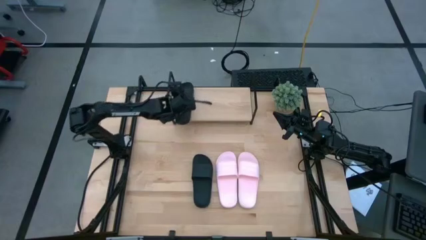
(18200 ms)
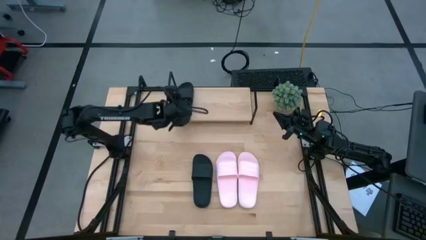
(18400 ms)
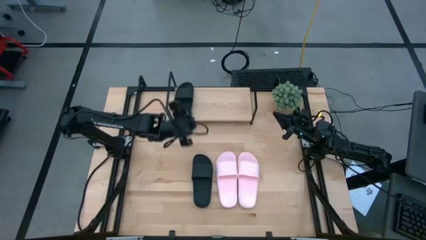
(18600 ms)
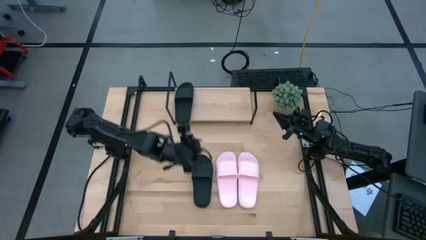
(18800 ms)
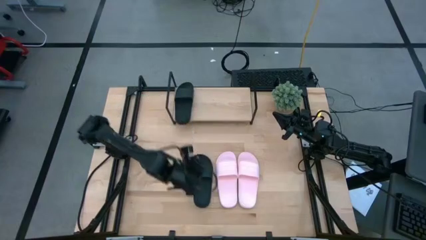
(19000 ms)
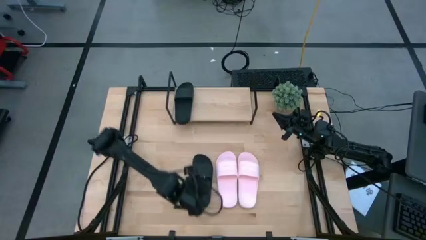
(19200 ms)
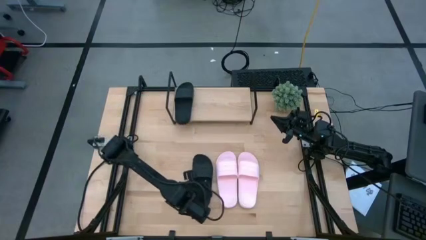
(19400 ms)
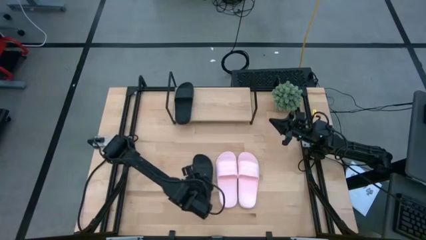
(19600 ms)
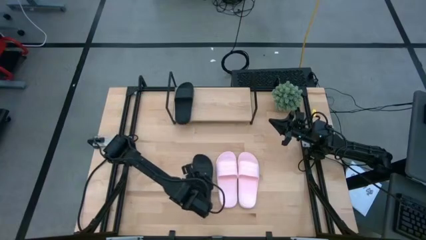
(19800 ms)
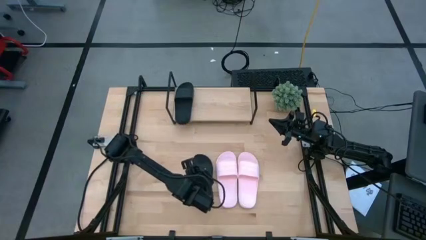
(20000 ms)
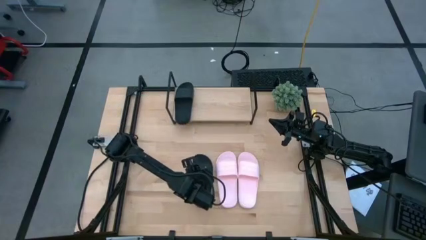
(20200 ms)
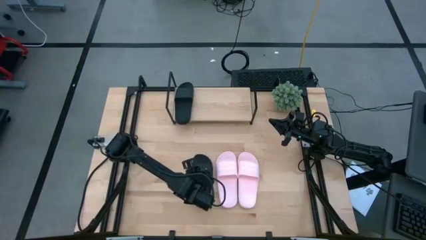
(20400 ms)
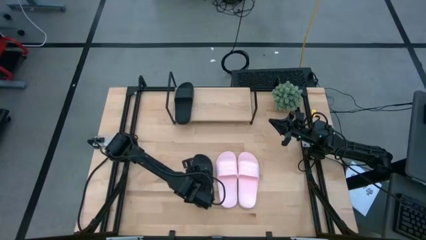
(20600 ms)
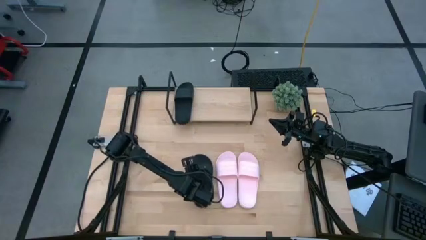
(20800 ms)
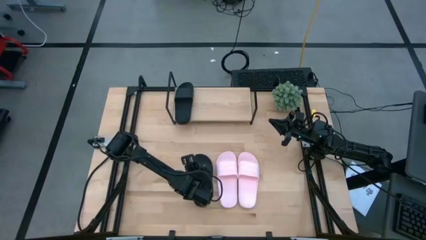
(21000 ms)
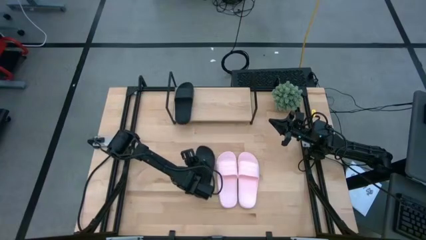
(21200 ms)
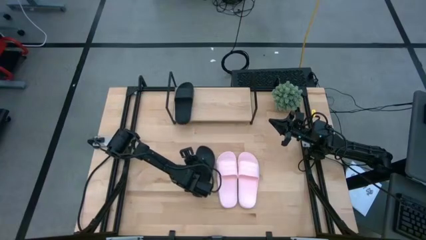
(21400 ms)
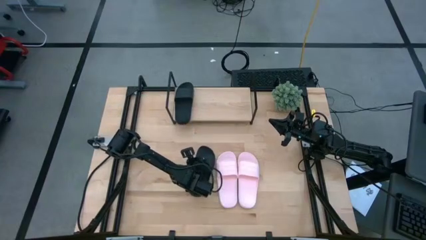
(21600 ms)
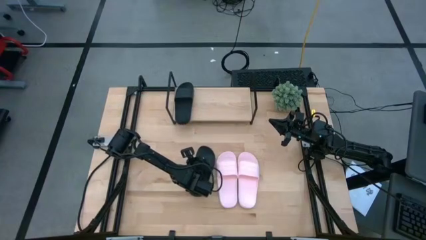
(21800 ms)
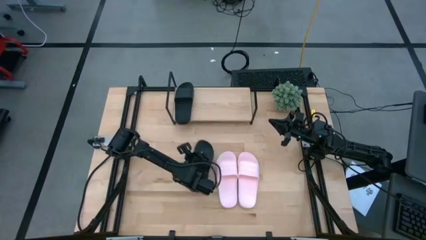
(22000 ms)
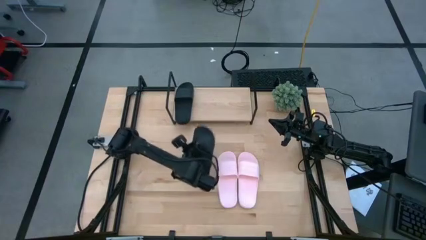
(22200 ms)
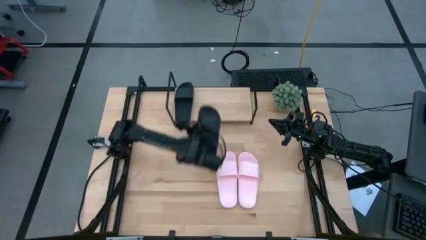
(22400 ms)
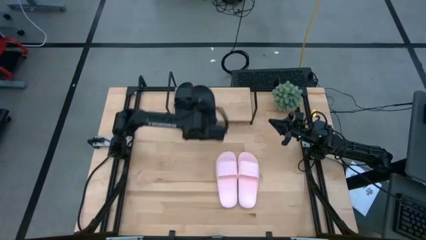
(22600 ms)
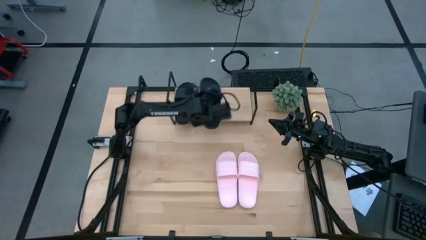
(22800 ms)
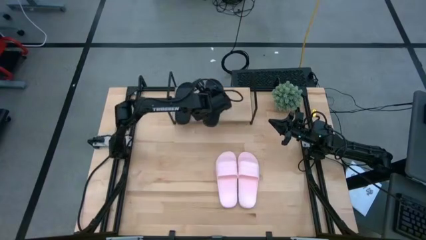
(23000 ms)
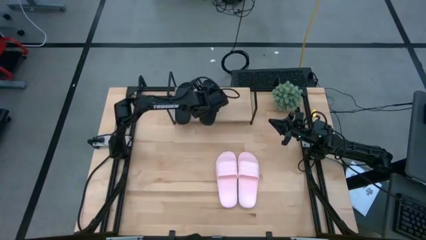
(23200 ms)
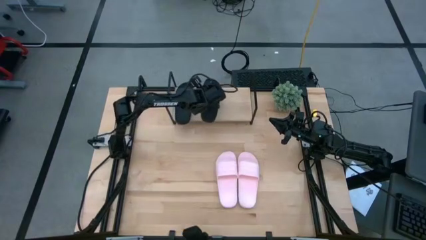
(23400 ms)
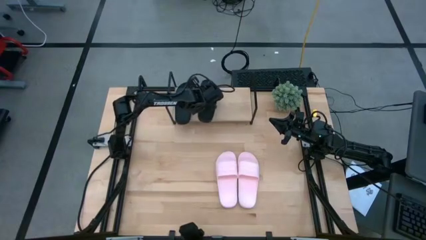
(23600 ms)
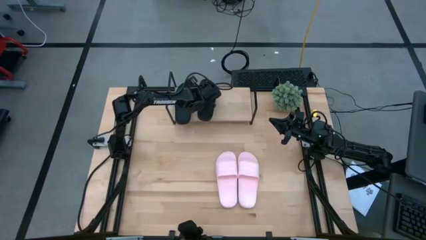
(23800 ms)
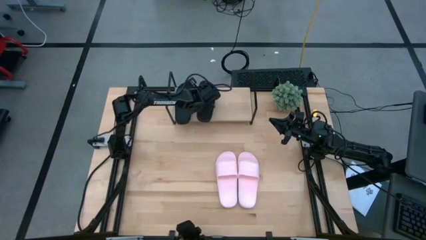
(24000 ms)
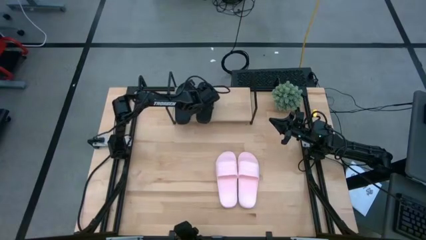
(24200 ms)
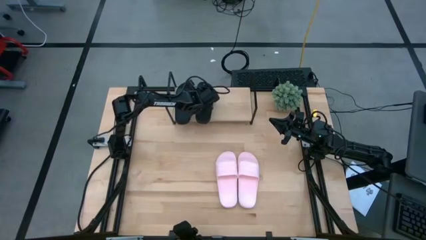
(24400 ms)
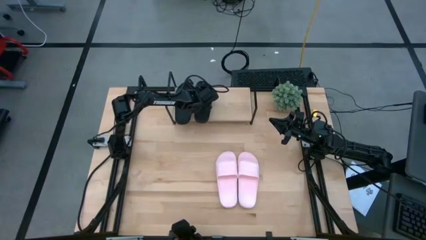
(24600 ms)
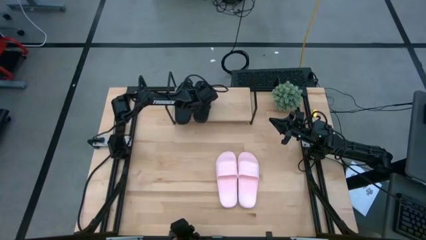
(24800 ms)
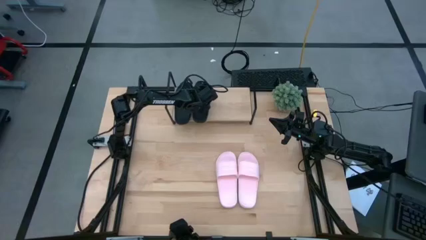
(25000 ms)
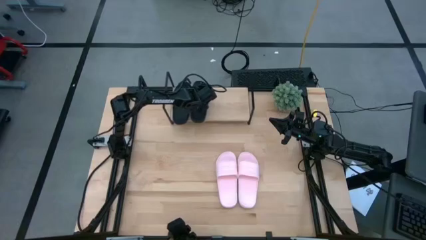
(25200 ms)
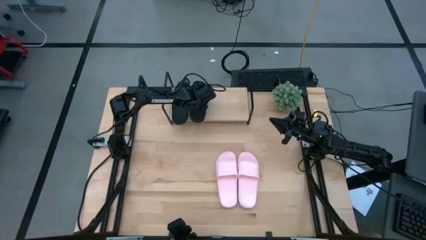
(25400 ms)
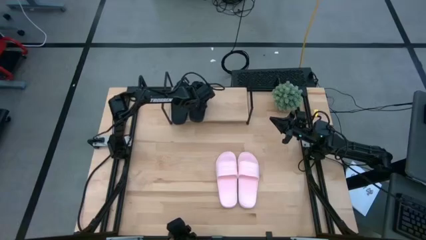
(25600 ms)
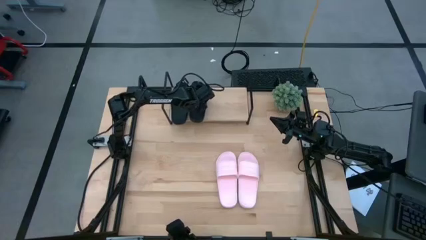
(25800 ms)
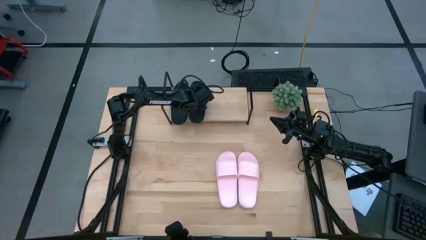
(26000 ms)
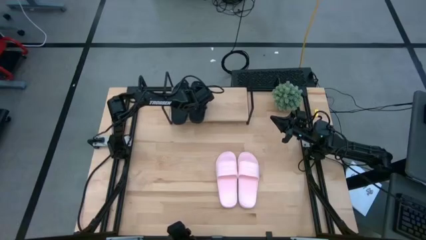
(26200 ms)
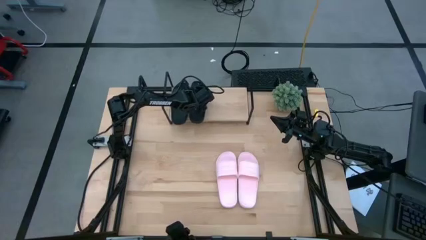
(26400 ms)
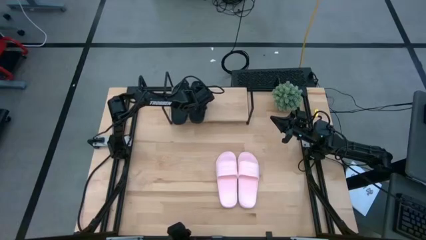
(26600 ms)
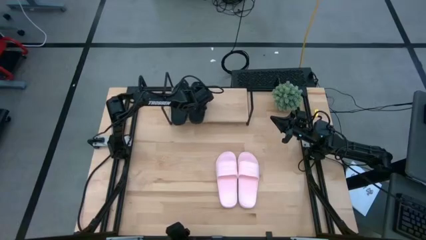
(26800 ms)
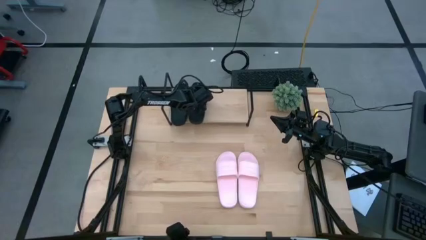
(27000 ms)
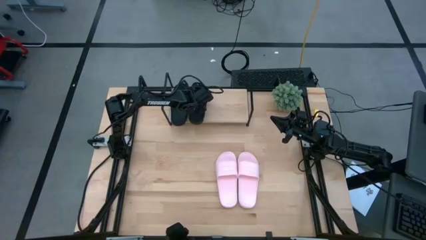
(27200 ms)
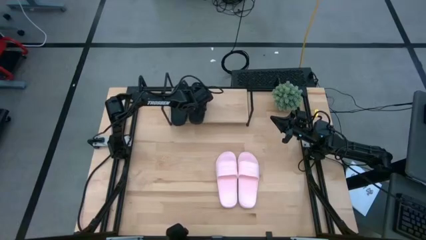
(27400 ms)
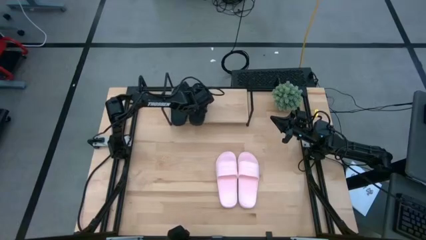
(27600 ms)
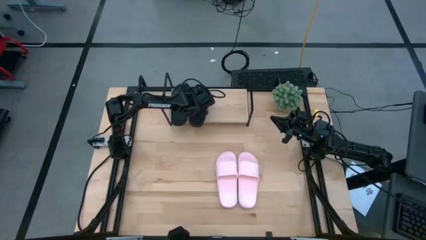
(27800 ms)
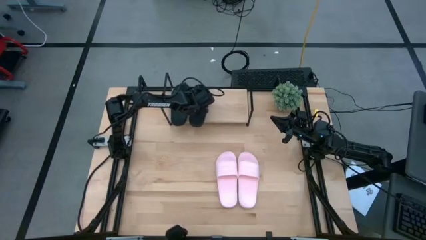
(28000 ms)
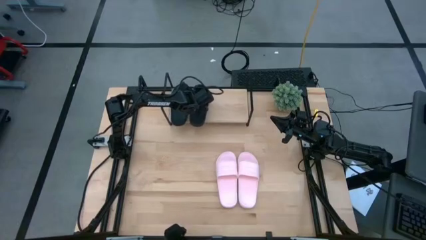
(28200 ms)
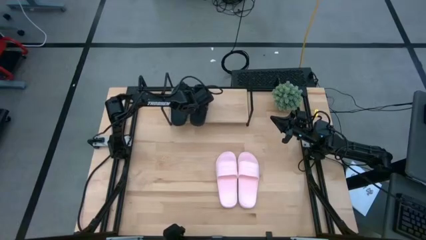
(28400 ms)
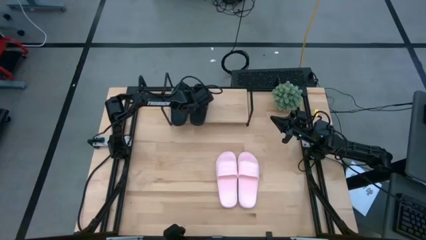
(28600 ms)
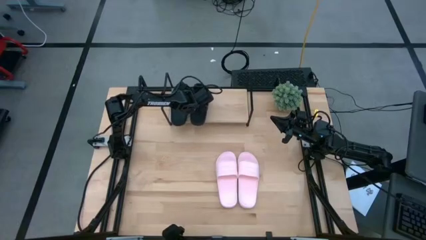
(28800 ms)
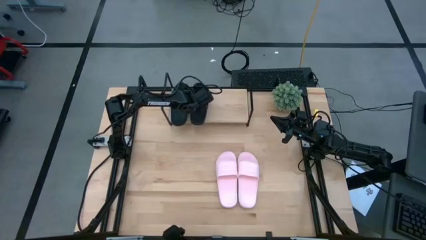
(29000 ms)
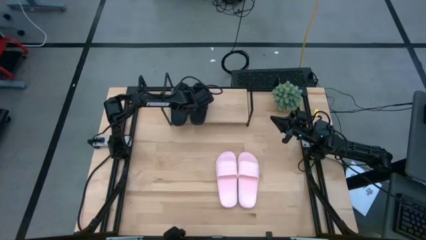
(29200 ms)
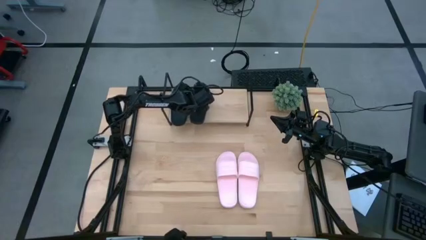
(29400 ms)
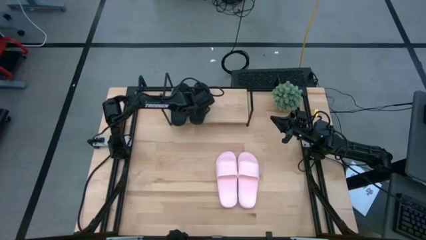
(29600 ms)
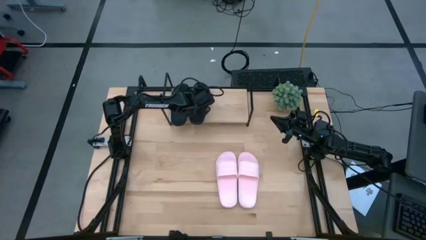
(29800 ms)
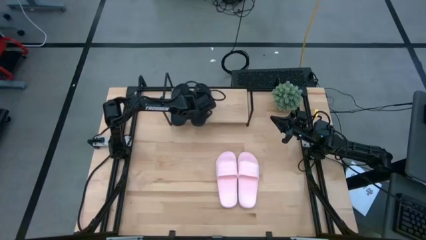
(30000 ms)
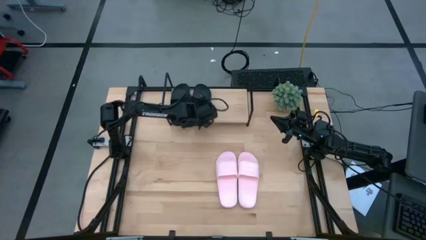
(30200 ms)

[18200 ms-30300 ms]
Task: Pick and place slides into the shelf
Put the black slipper on the shelf

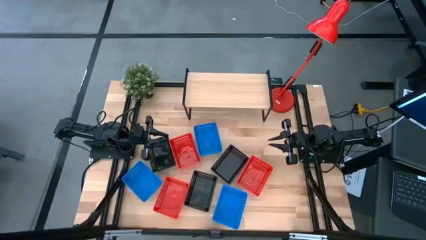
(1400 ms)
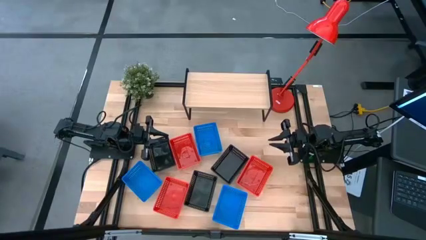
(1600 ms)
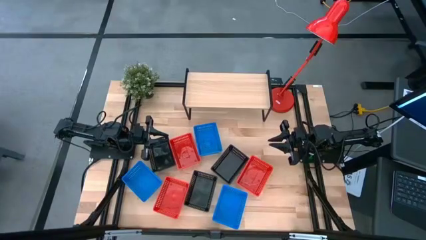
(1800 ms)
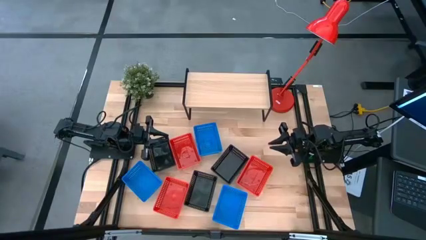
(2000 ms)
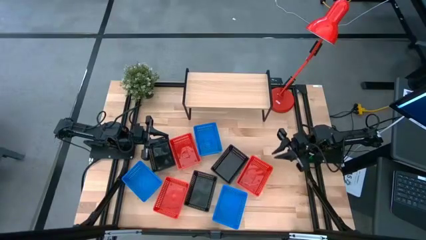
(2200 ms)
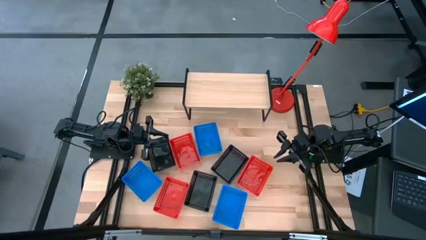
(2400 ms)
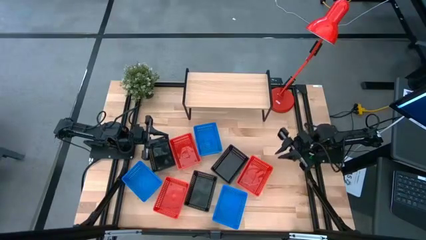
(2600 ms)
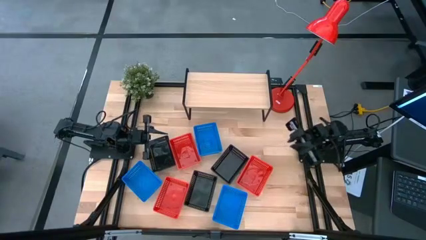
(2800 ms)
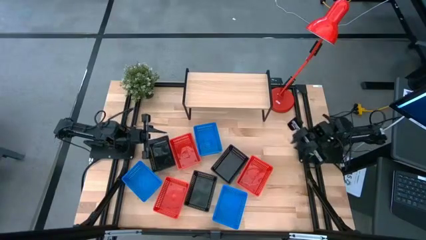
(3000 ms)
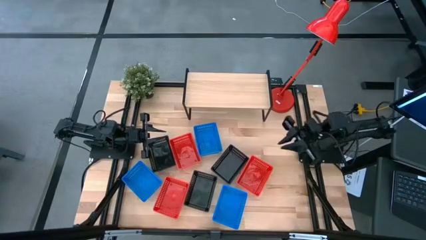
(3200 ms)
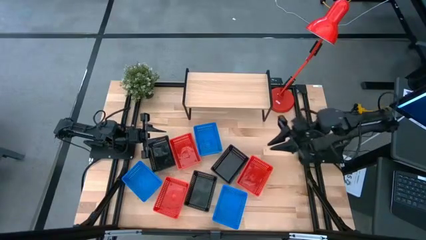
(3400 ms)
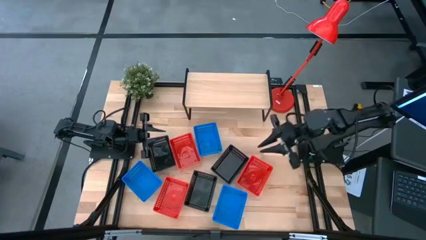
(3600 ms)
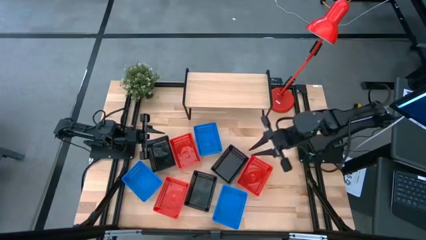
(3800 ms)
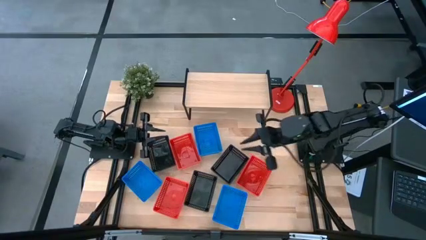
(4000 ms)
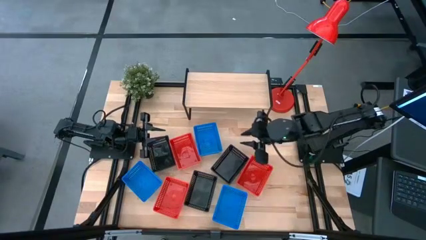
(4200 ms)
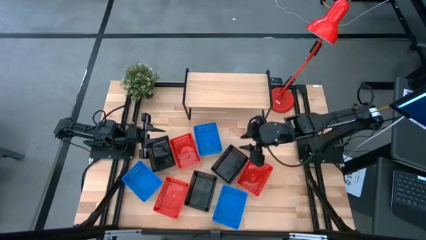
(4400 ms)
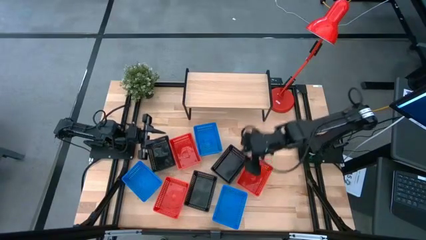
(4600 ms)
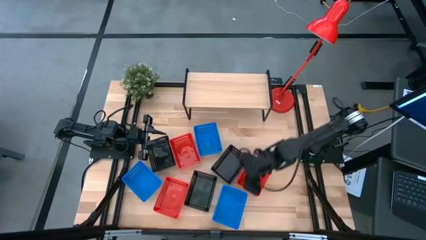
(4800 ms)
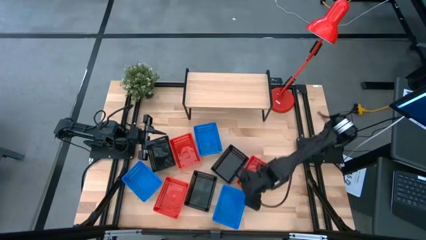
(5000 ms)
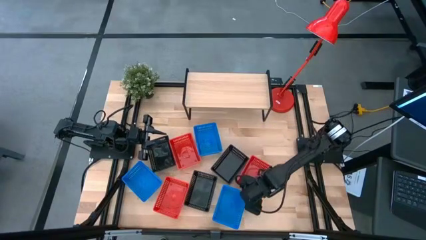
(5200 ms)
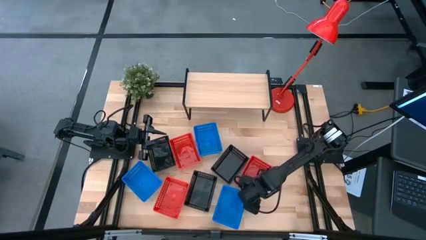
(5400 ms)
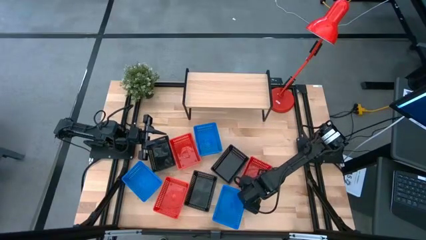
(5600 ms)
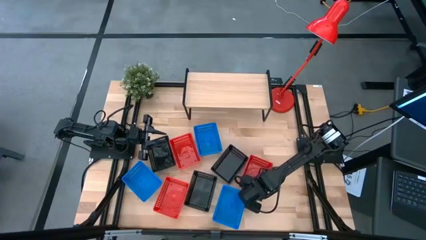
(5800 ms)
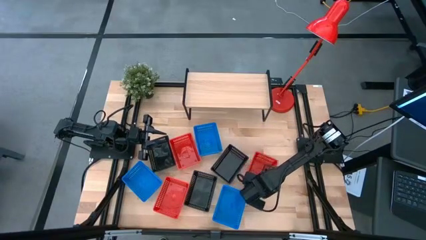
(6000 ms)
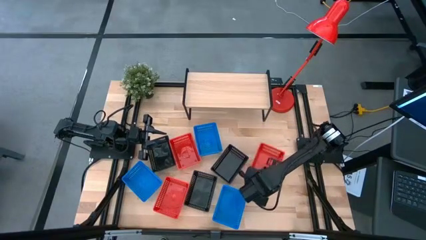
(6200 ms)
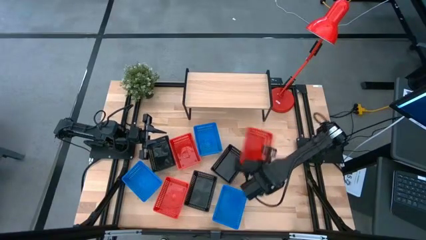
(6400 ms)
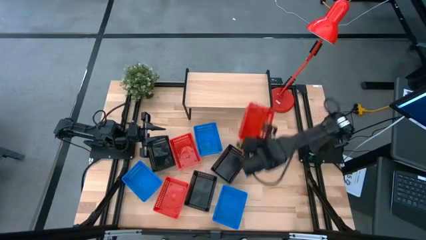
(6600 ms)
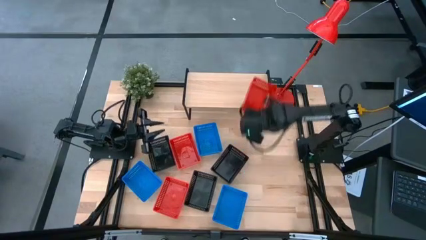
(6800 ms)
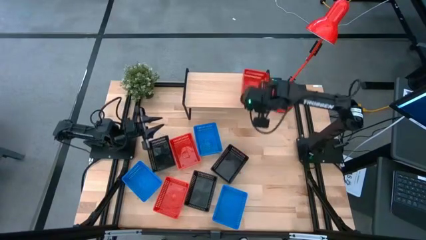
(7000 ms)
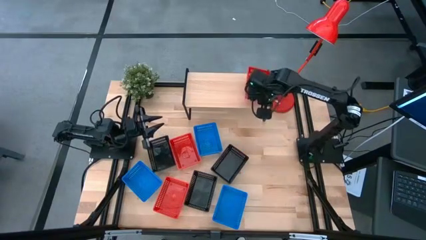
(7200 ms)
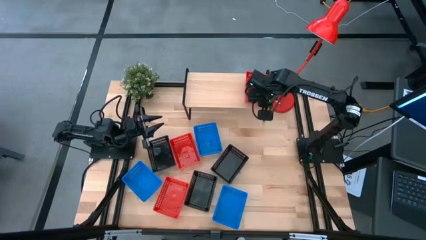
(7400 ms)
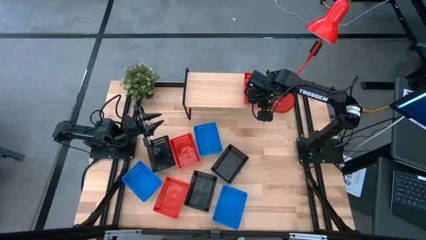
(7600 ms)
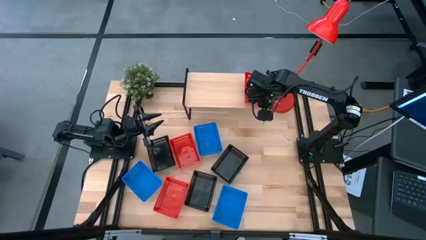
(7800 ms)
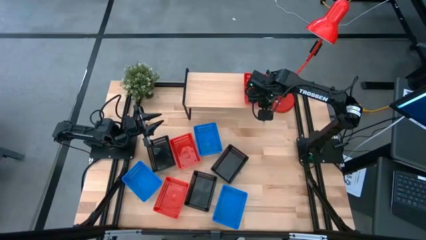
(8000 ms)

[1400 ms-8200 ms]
Task: Stack baskets on shelf by color
Put the right red basket on the shelf
